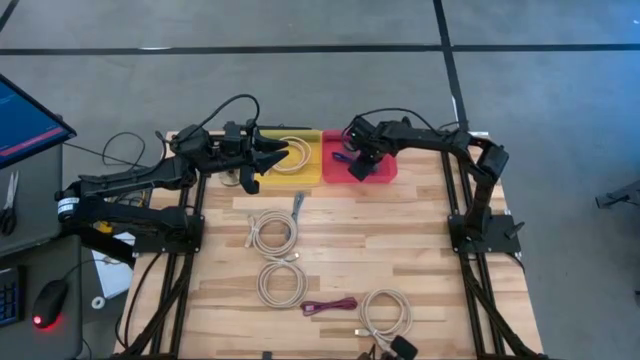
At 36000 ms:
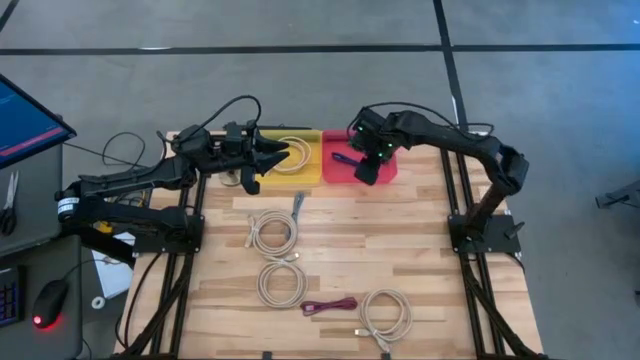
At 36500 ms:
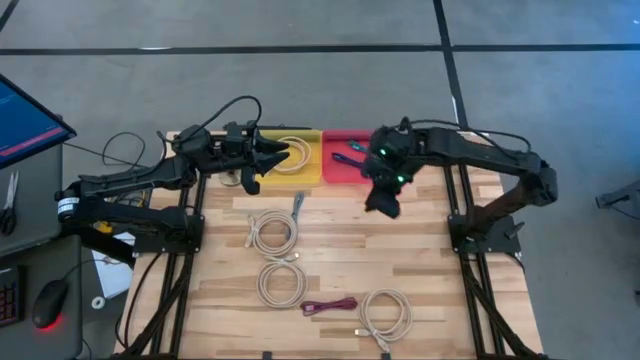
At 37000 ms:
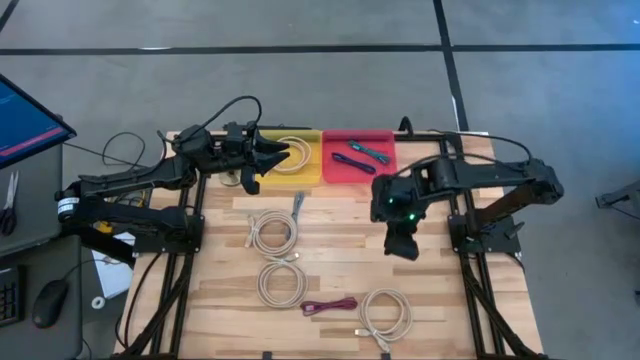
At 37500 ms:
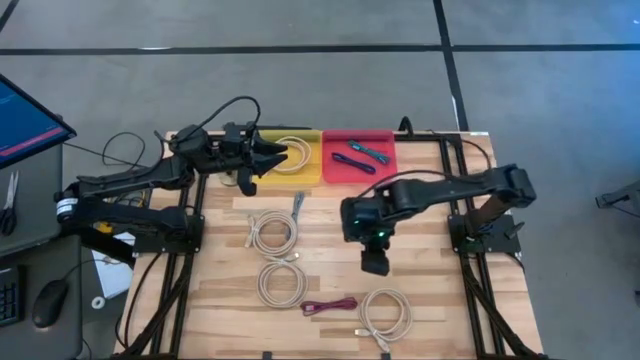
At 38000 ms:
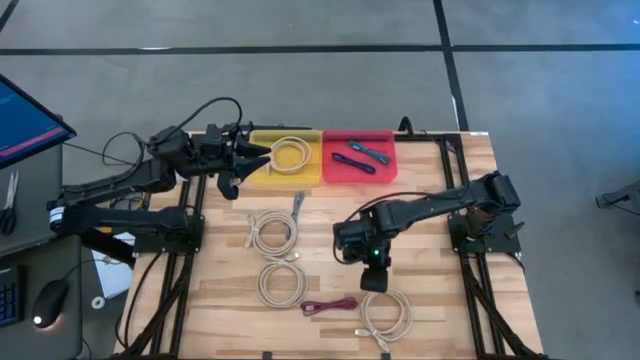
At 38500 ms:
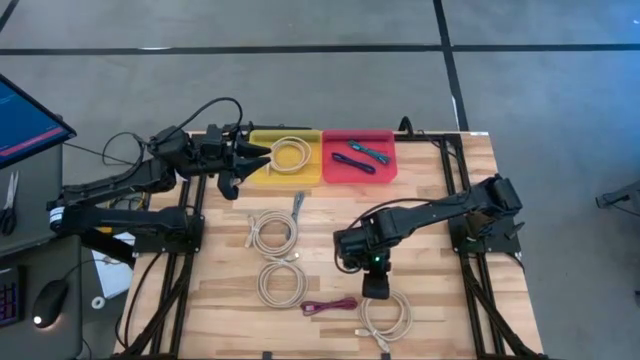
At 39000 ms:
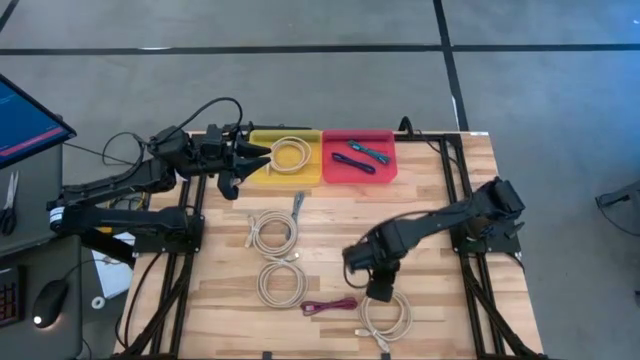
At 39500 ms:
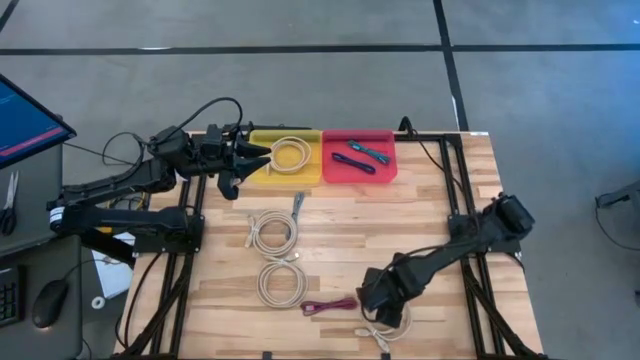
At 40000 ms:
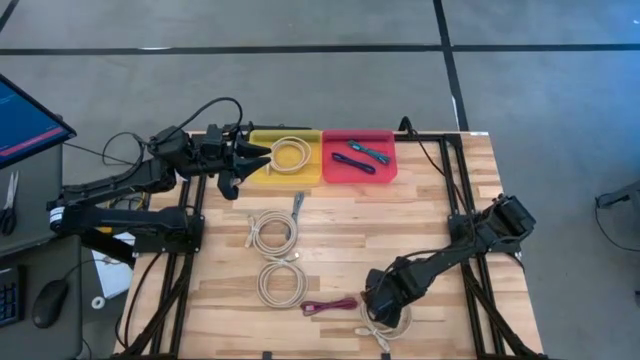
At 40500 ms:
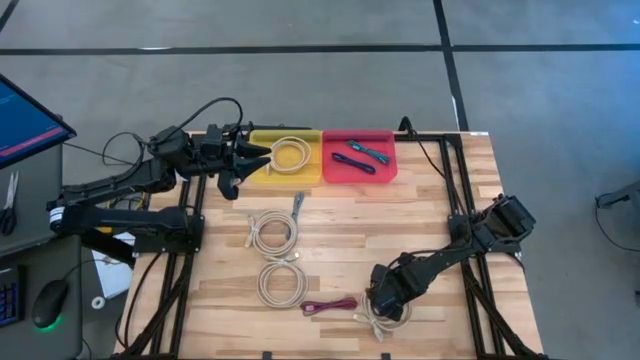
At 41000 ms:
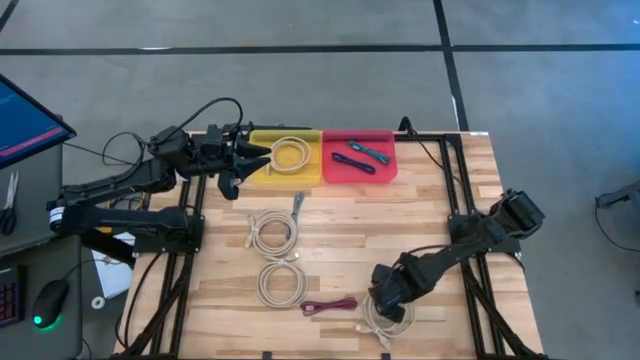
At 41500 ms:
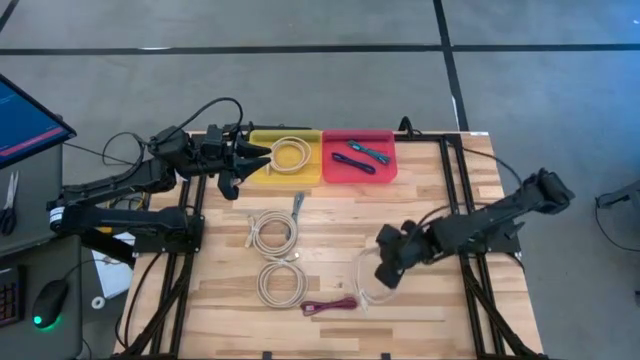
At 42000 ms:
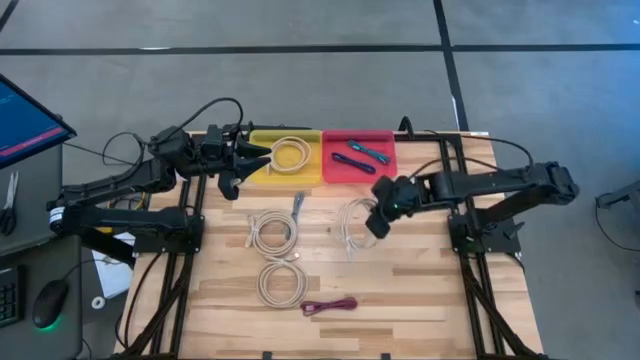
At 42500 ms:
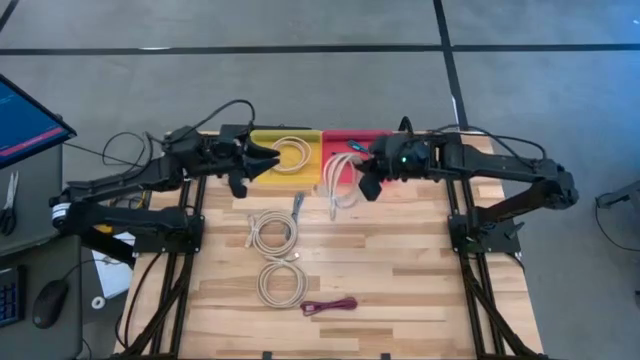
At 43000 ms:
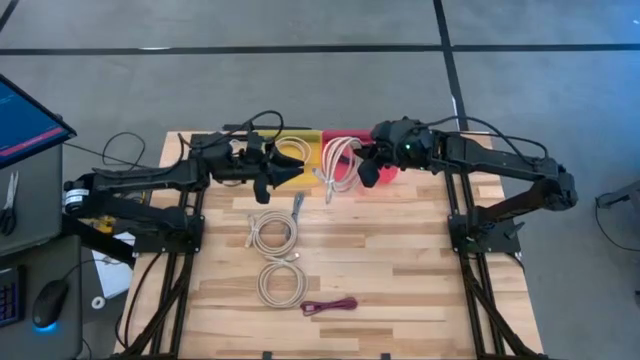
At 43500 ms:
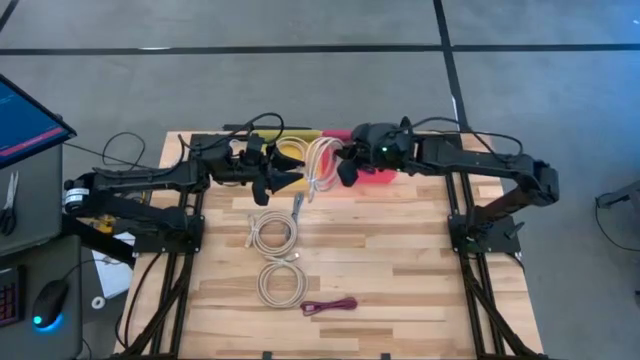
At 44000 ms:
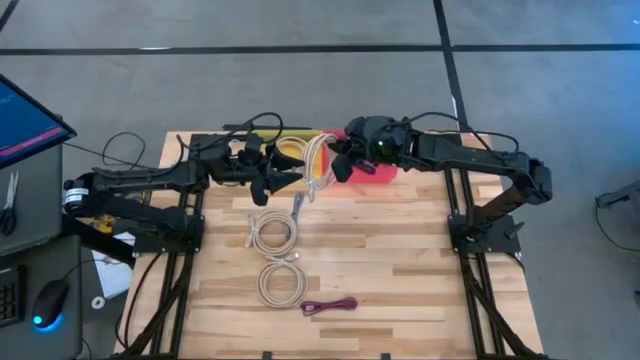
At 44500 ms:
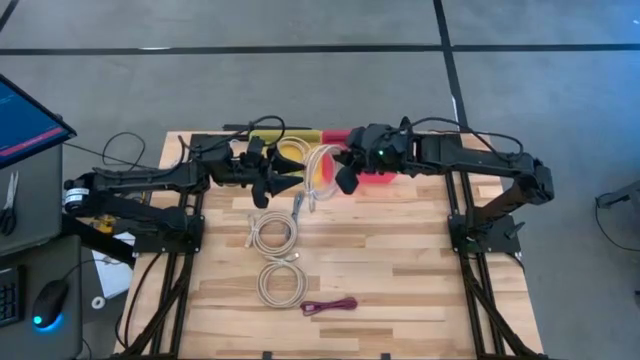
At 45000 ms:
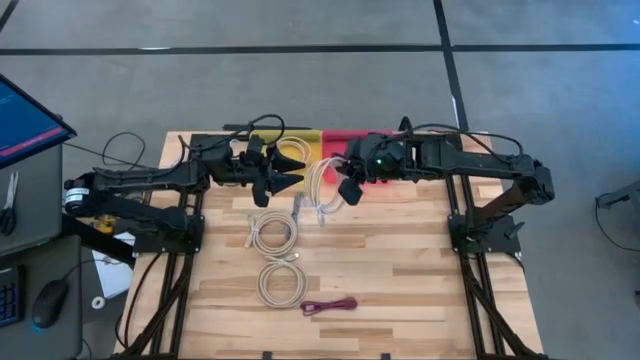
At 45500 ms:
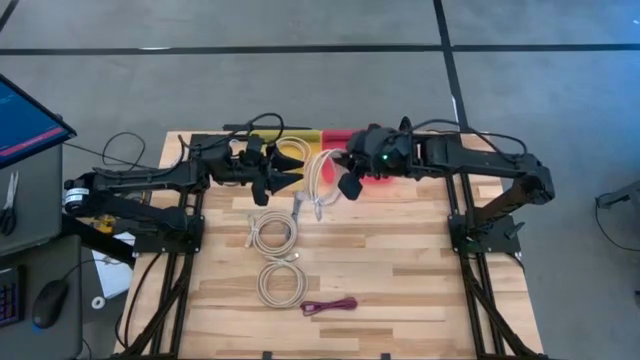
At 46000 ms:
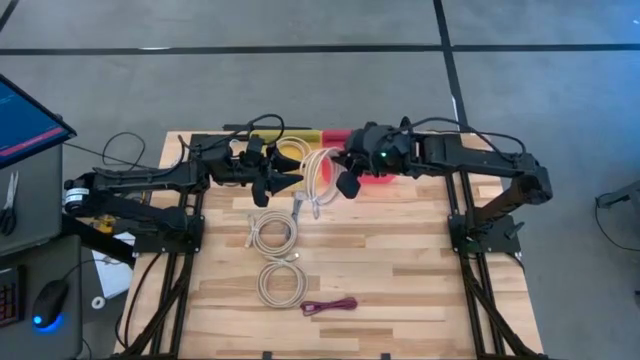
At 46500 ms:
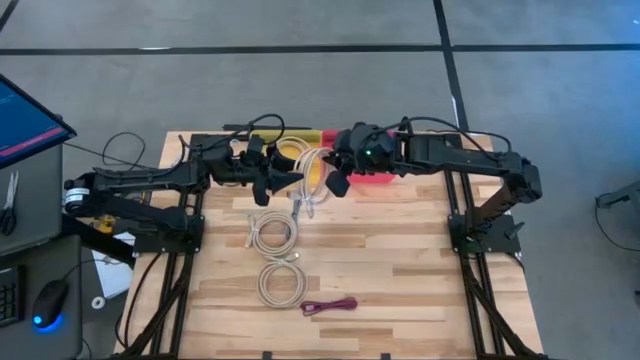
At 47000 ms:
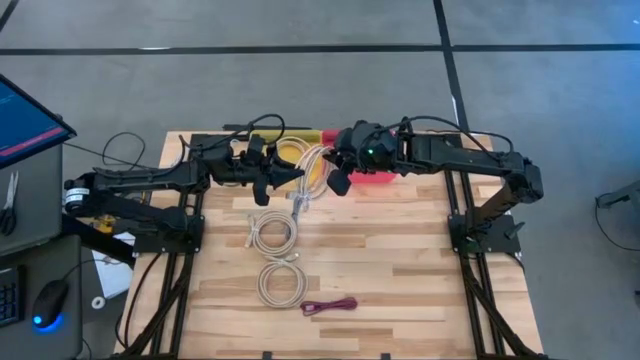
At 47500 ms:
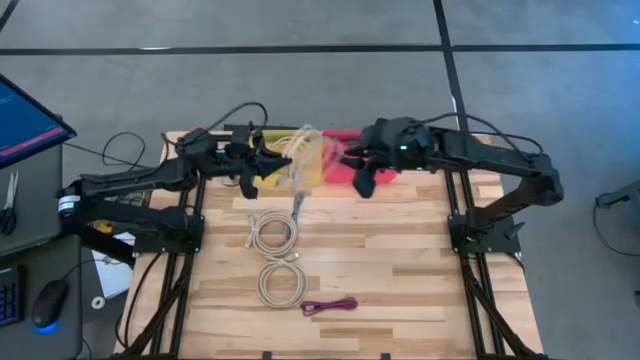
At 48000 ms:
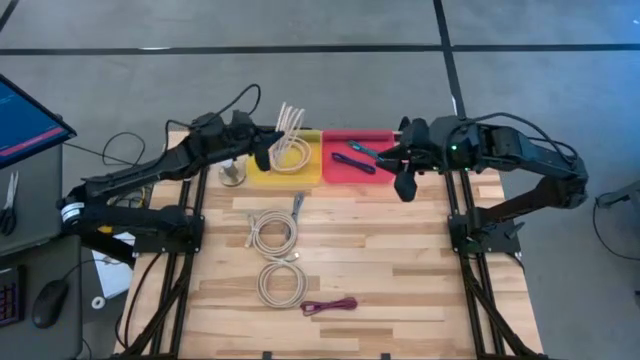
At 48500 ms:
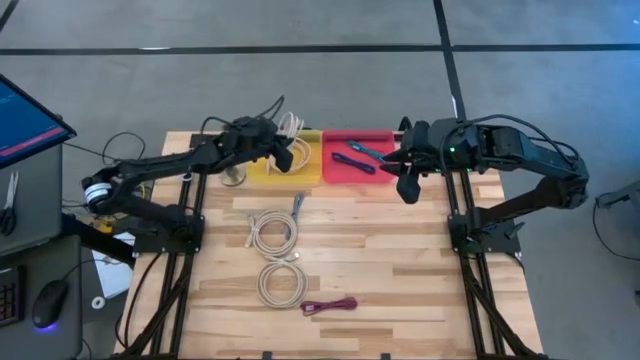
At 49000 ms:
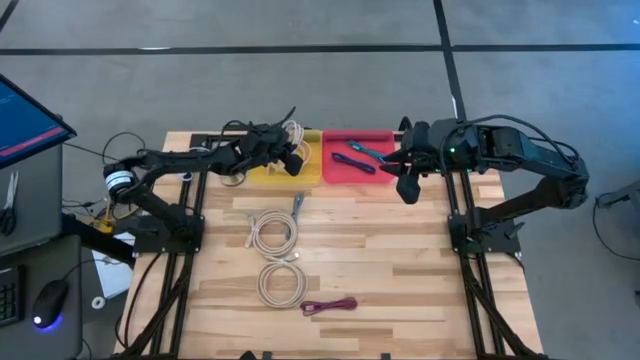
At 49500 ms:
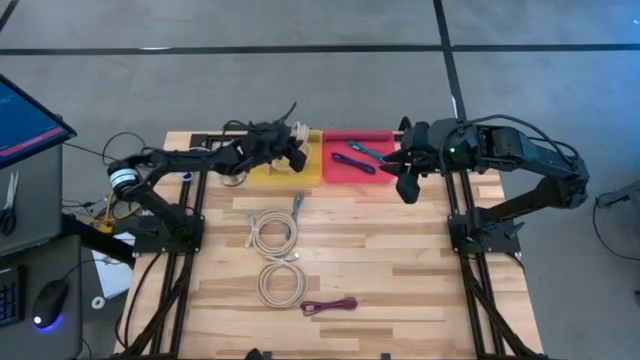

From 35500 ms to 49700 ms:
Task: Pick & Place USB Port
Put the large white charger cable into the yellow bin

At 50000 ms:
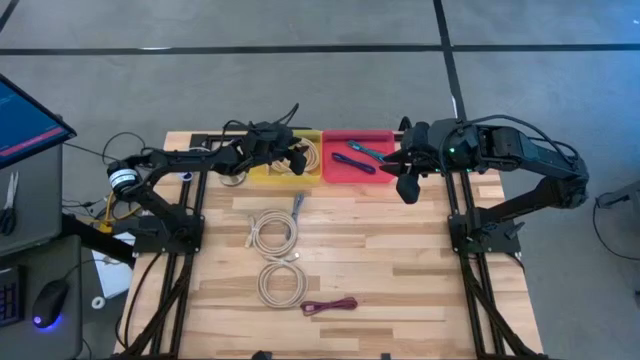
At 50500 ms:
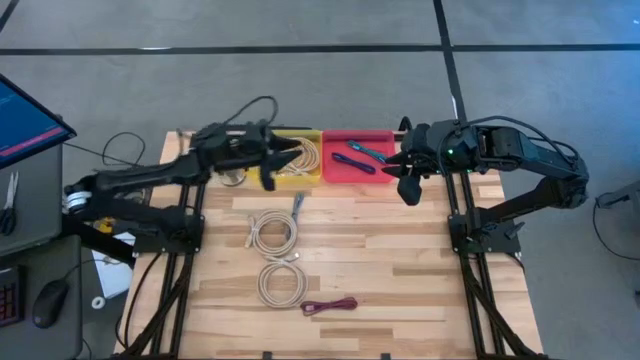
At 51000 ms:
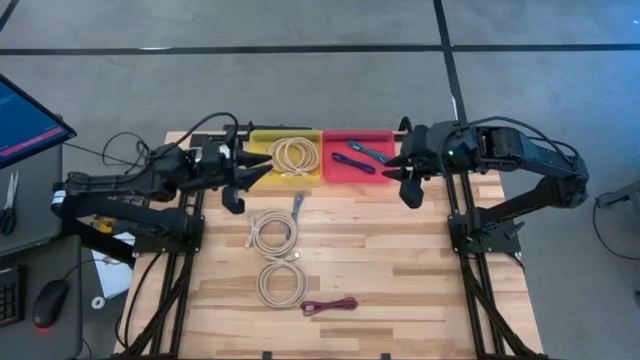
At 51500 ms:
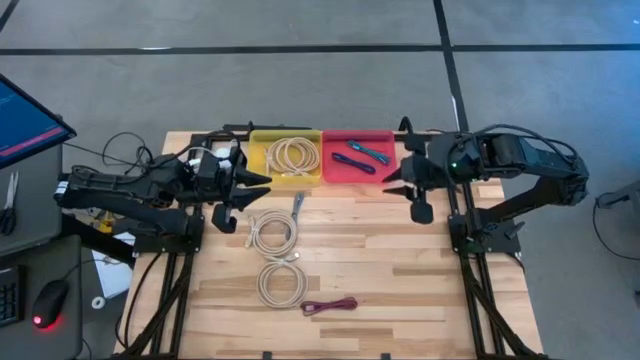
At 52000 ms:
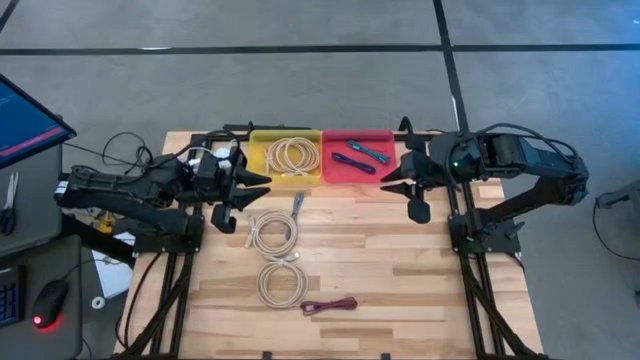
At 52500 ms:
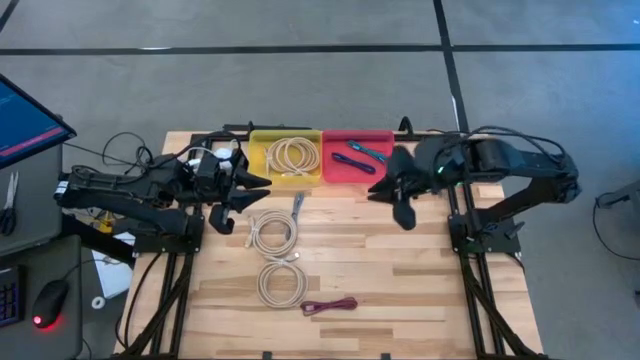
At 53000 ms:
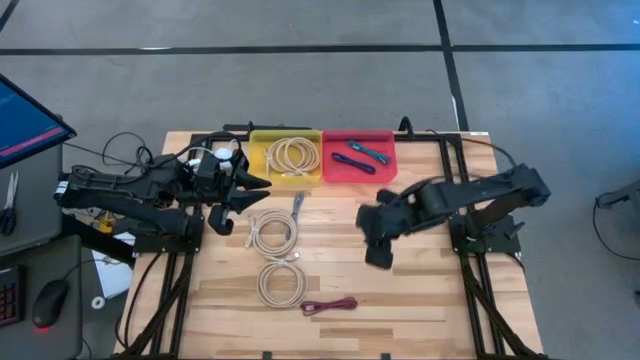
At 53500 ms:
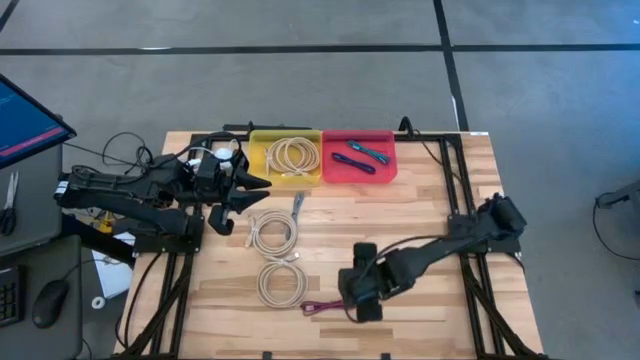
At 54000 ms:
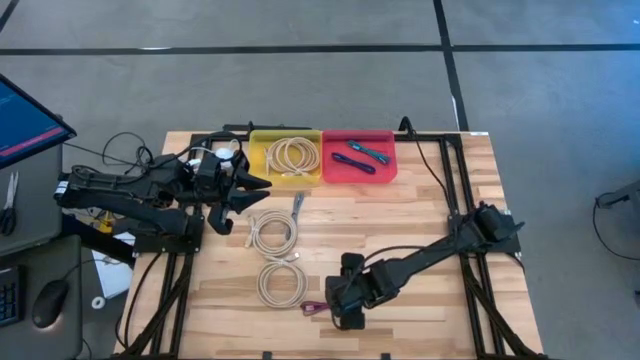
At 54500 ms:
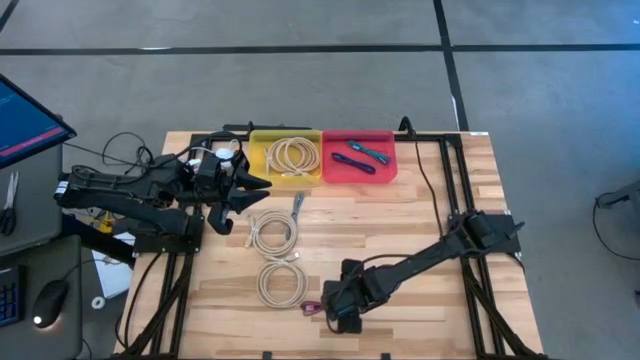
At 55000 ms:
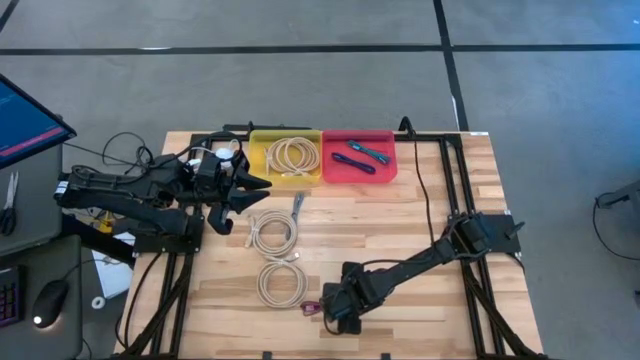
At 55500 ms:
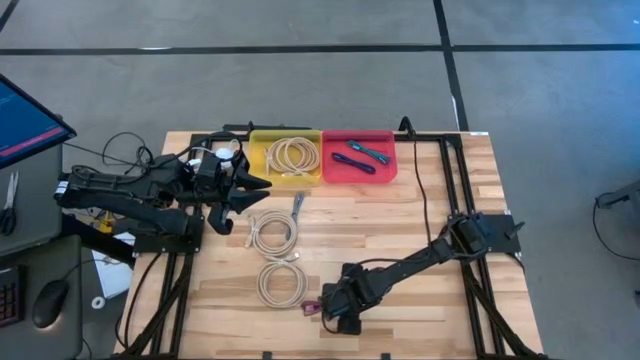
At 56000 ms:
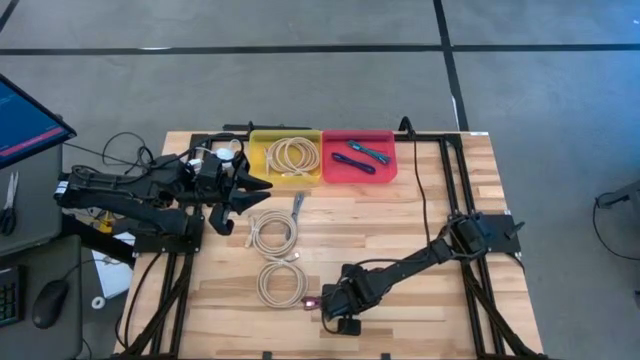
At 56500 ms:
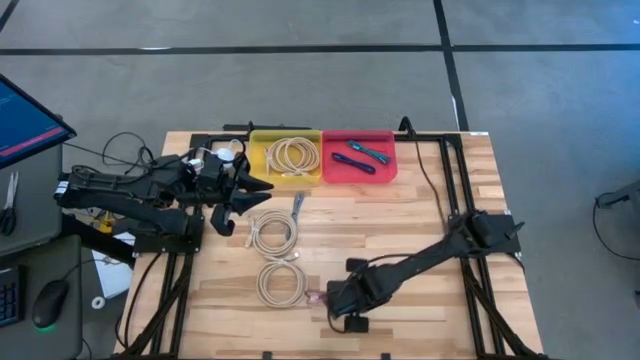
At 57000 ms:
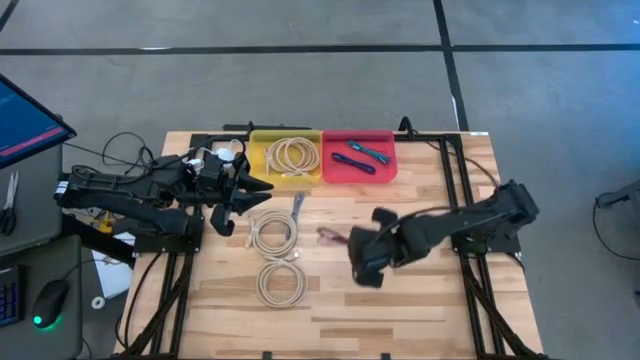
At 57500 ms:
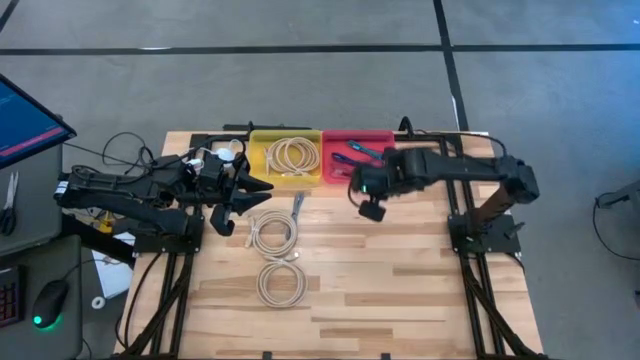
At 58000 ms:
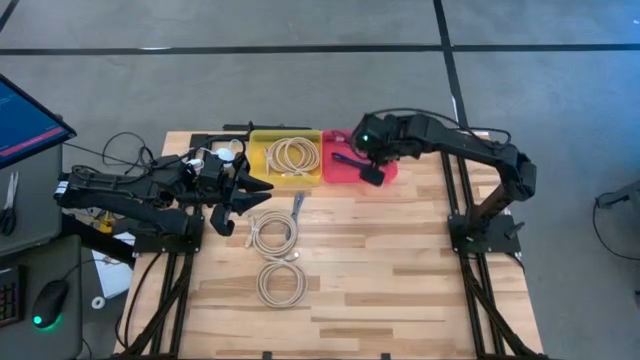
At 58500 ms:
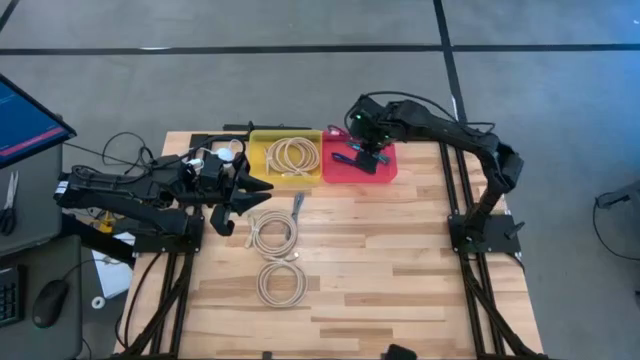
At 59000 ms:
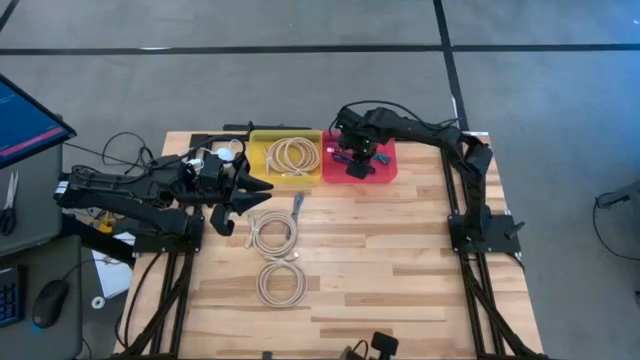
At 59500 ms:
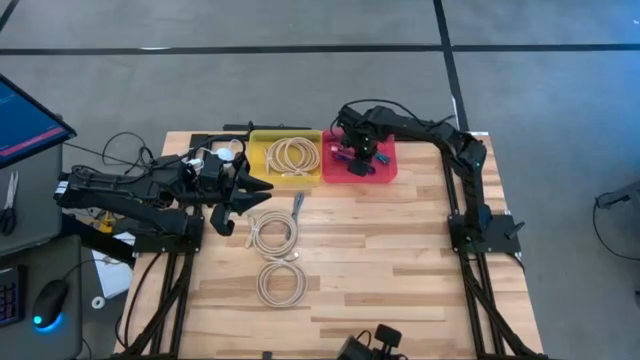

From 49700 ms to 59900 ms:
Put the small black and pink charger cable into the red bin
